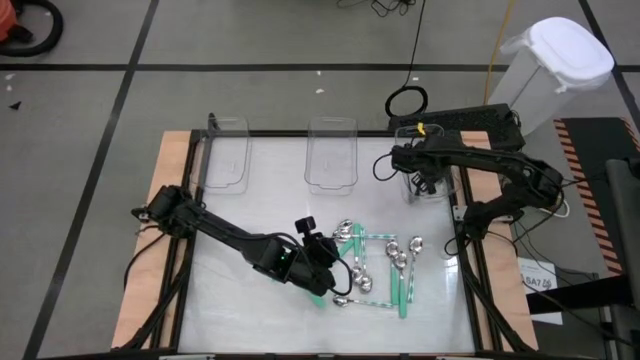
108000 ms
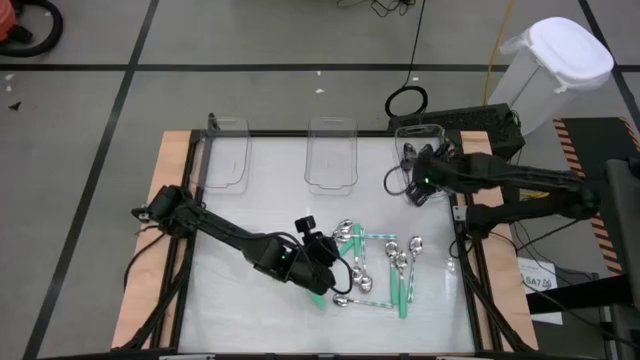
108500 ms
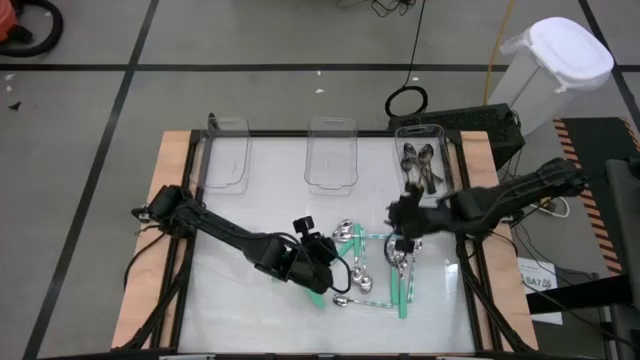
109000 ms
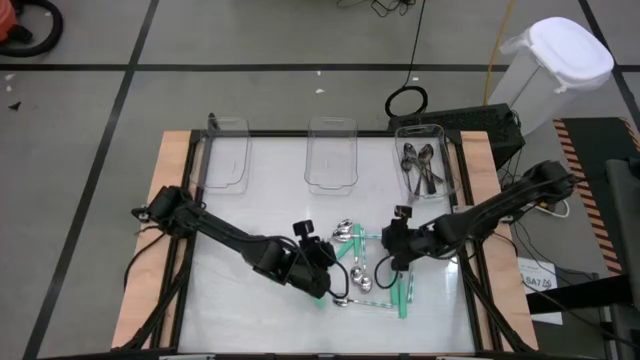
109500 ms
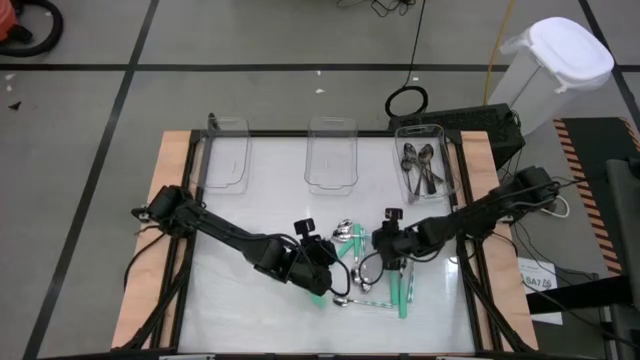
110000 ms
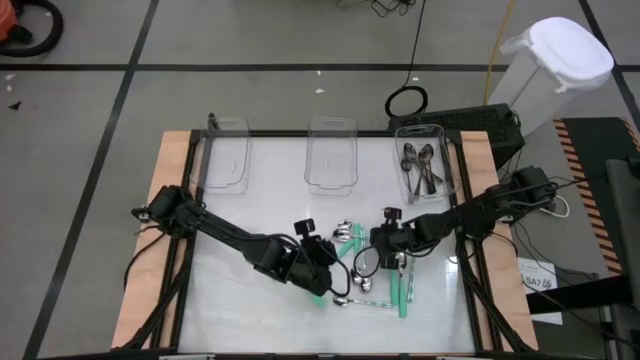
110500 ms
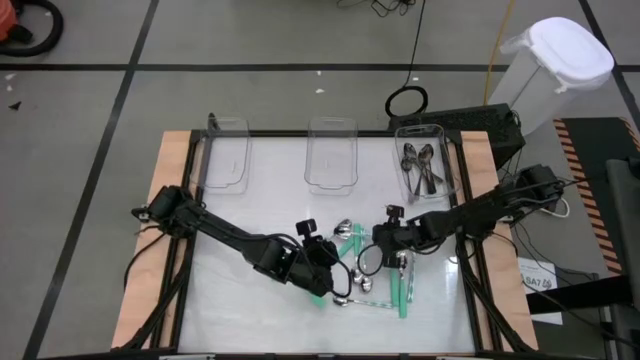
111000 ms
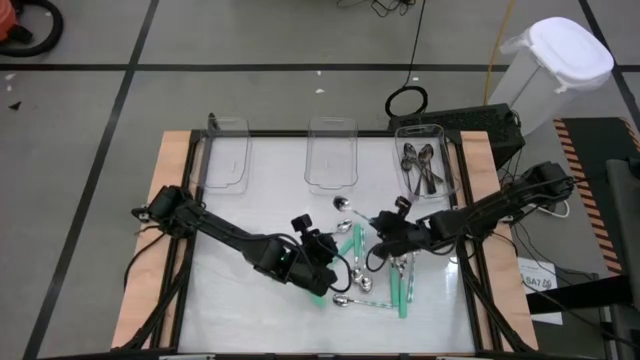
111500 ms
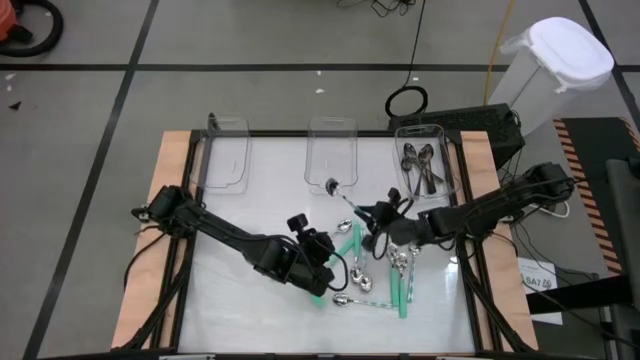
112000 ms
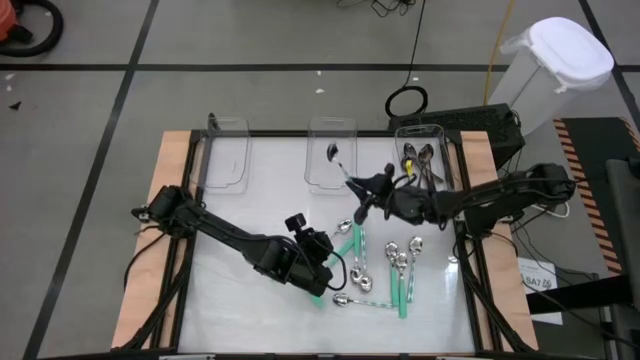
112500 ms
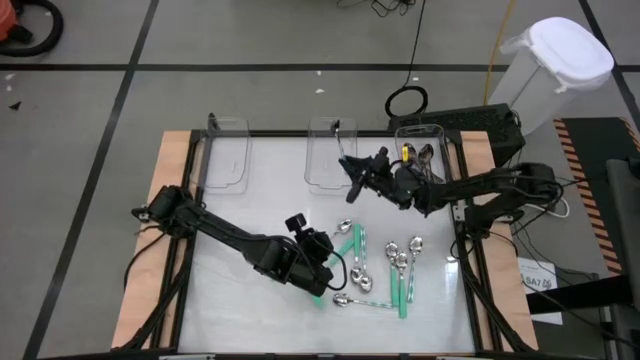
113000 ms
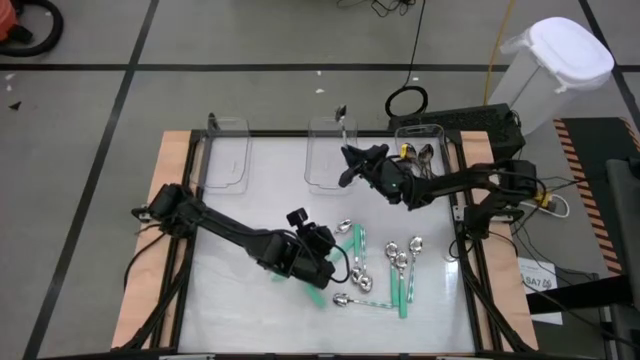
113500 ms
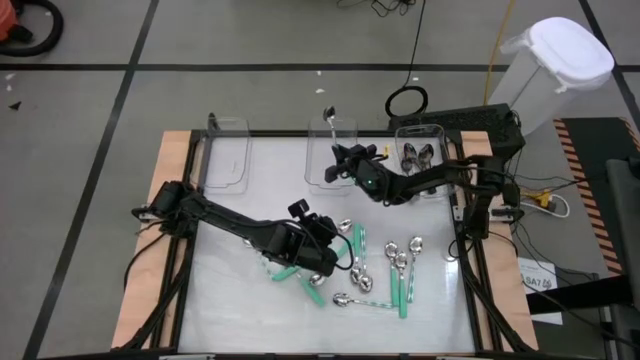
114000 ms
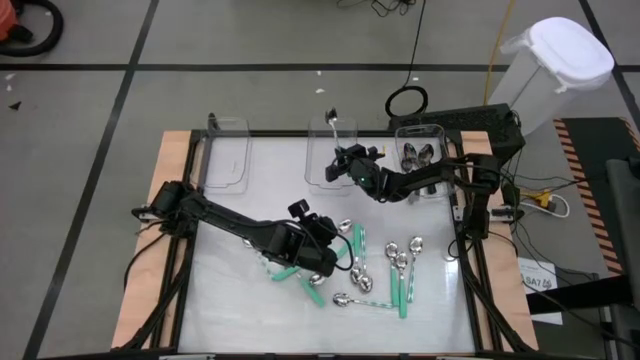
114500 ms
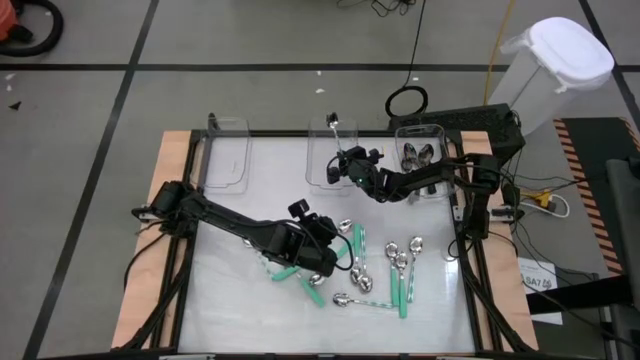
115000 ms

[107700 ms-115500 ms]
Task: Sort silverware by color (type)
Put the white-green spoon into the middle transparent bin

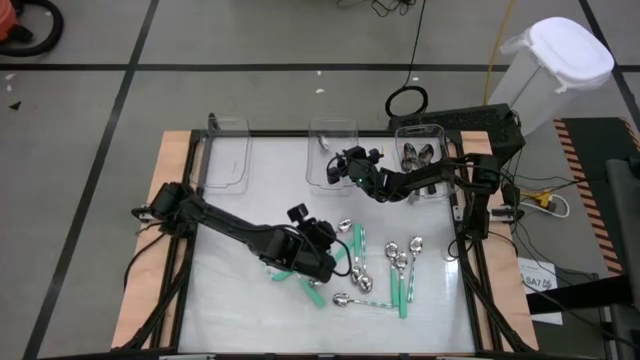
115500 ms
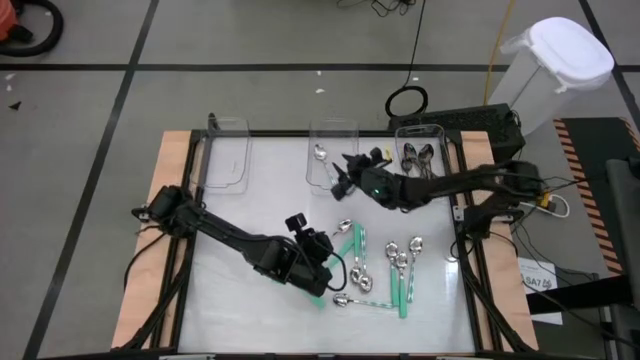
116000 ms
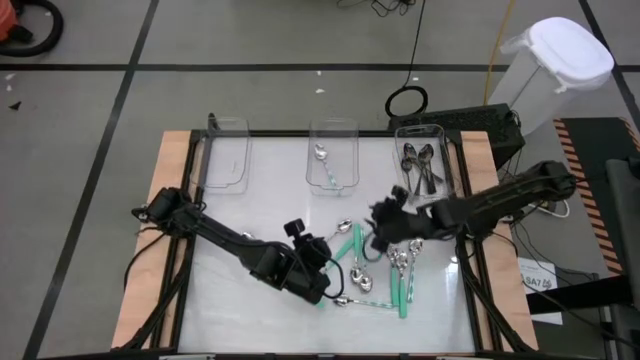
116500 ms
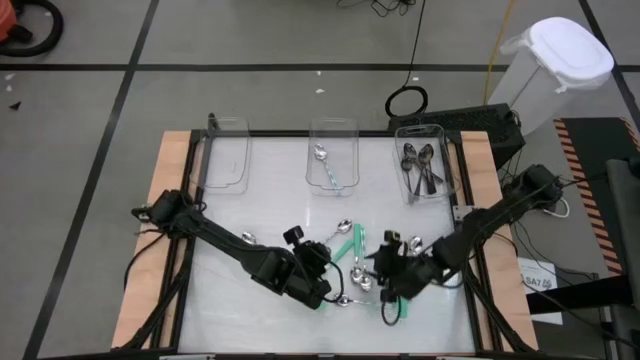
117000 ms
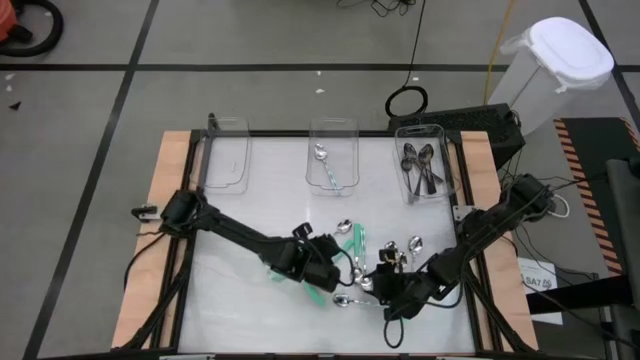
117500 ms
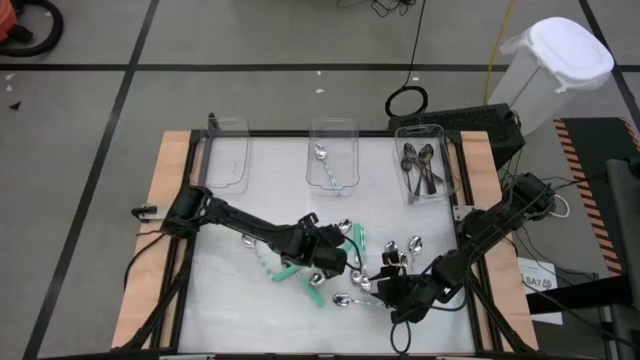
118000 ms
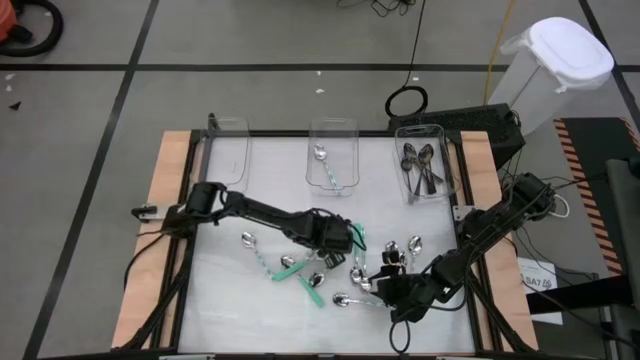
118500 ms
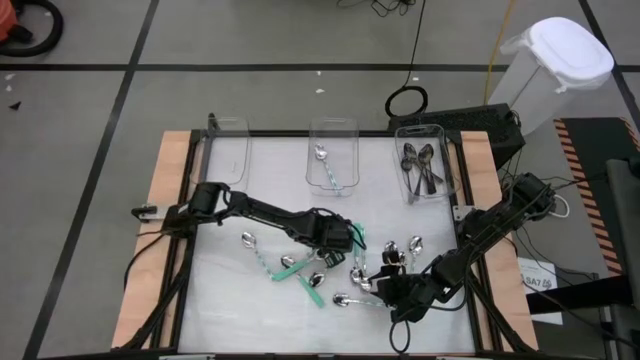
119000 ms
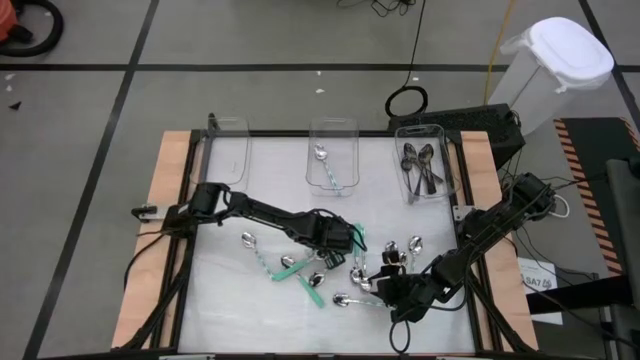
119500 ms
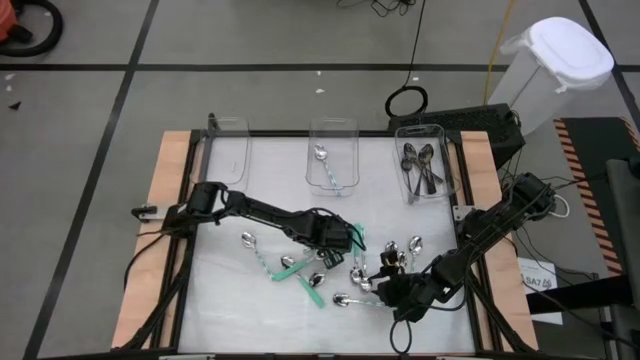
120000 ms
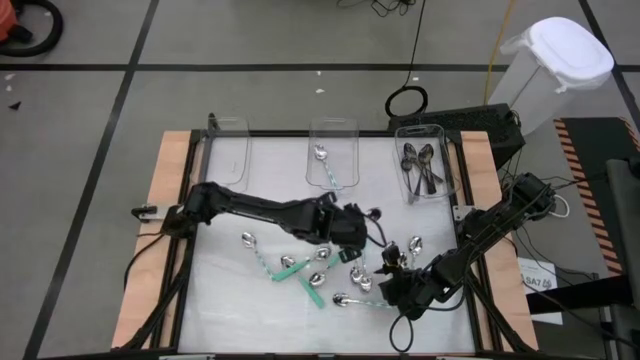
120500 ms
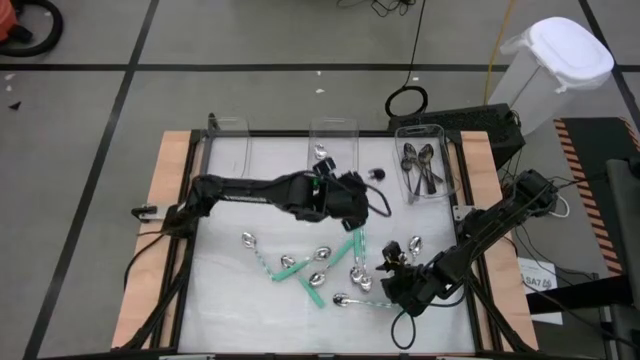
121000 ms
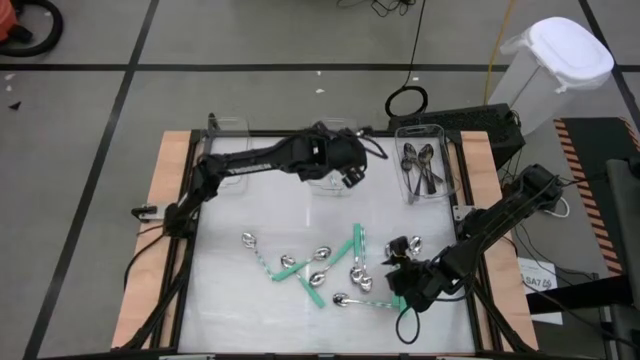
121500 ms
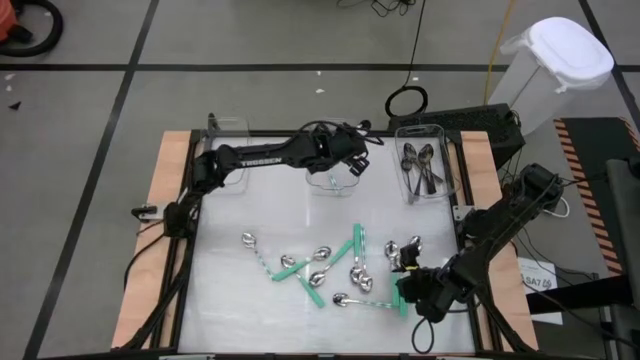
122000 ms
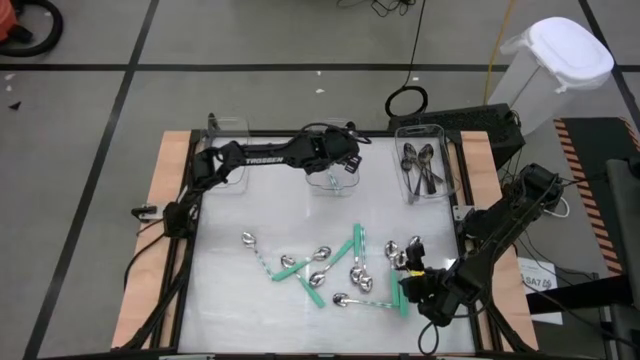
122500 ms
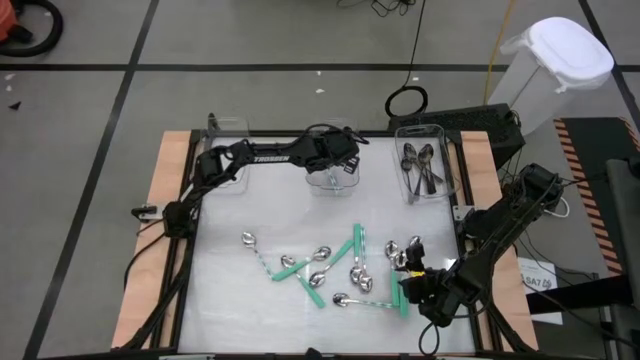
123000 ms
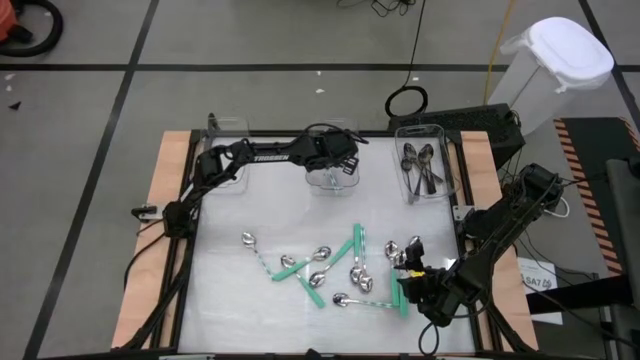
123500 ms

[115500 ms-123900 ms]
Put the white-green spoon into the middle transparent bin

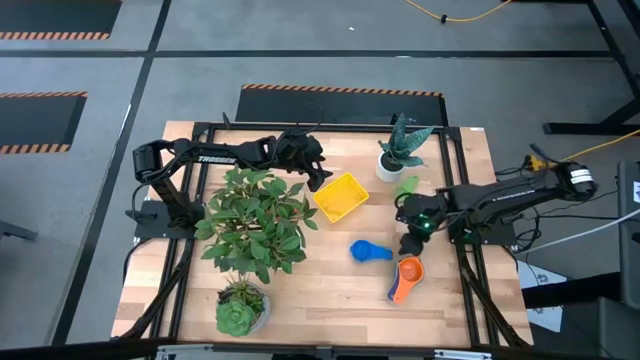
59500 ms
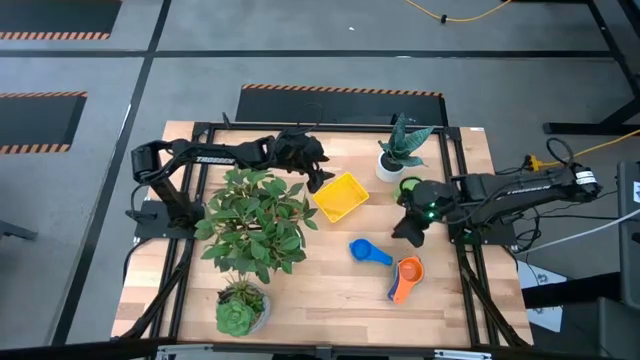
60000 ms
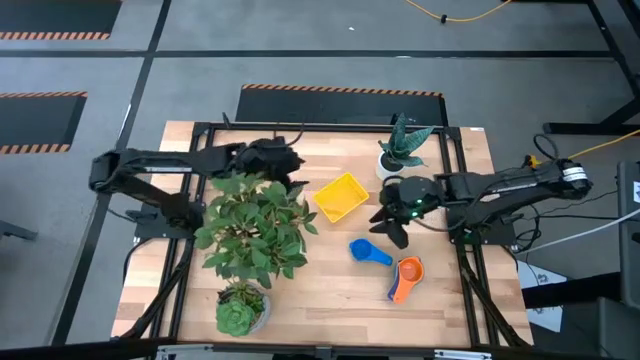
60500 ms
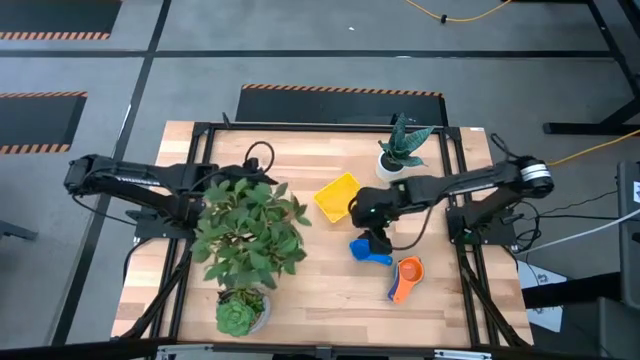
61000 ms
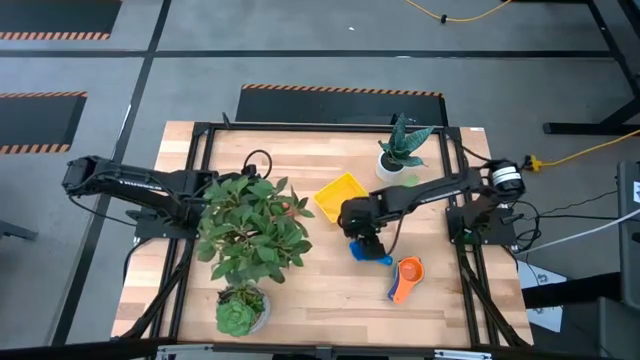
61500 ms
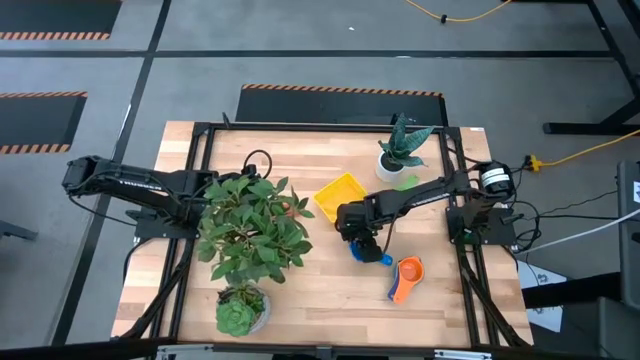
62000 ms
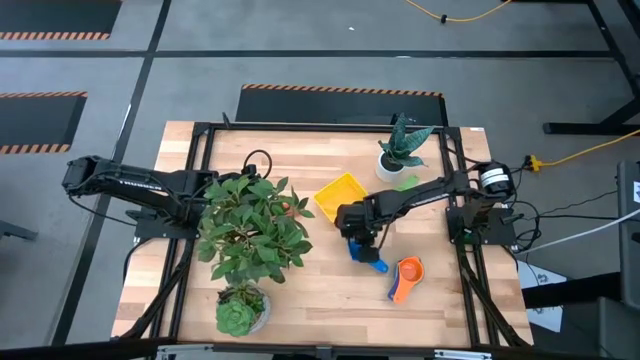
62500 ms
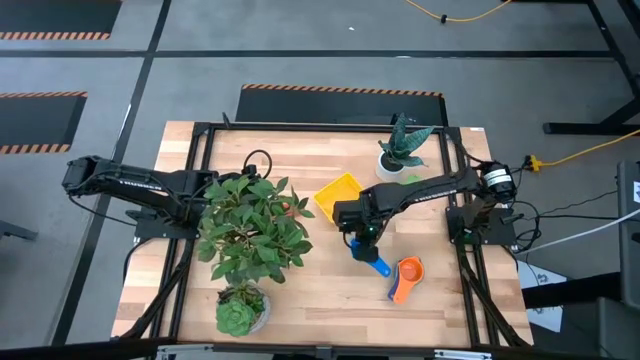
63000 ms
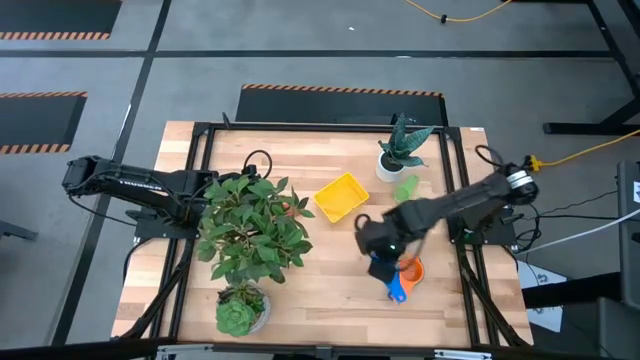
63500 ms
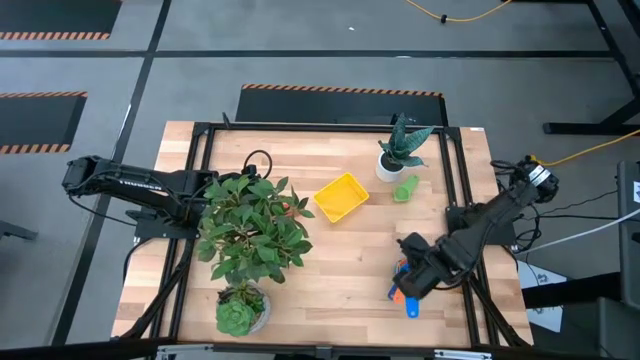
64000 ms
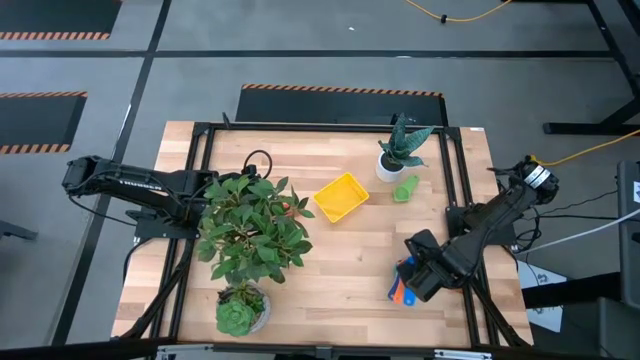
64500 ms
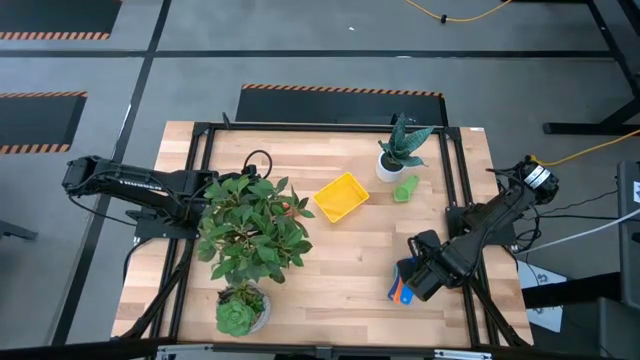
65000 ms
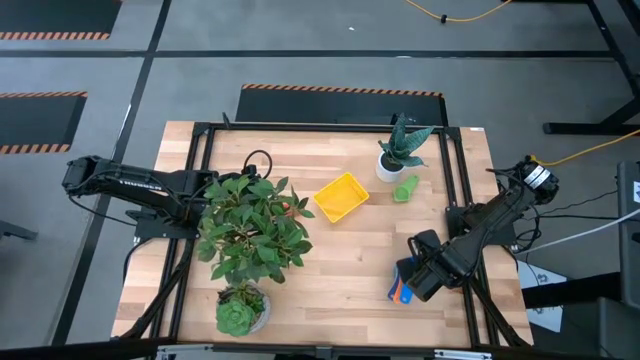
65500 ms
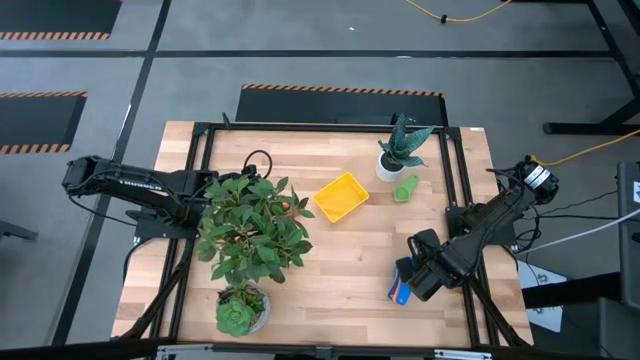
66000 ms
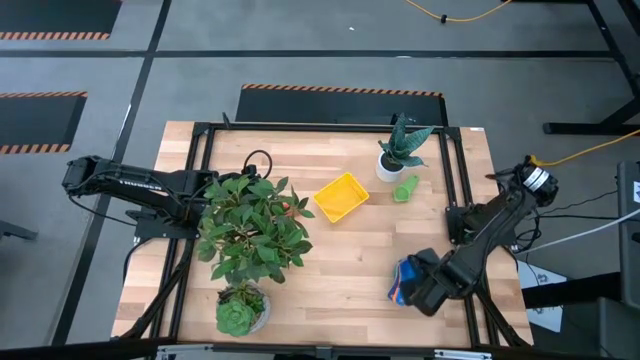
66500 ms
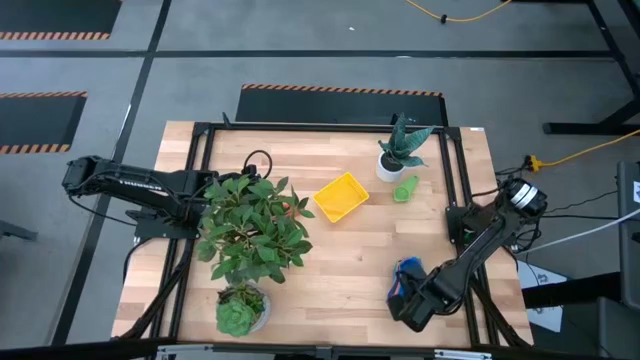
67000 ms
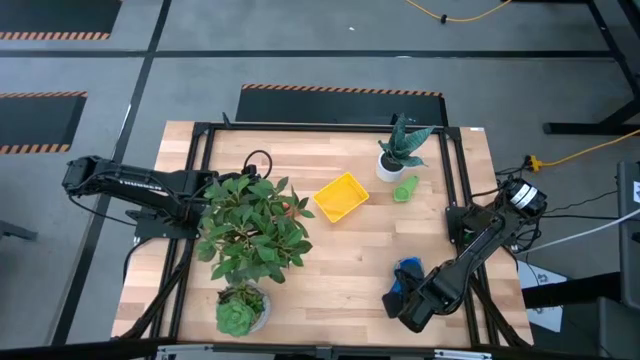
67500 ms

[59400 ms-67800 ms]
Task: Nest measuring cups in basket
Stack the blue measuring cup on top of the orange measuring cup
